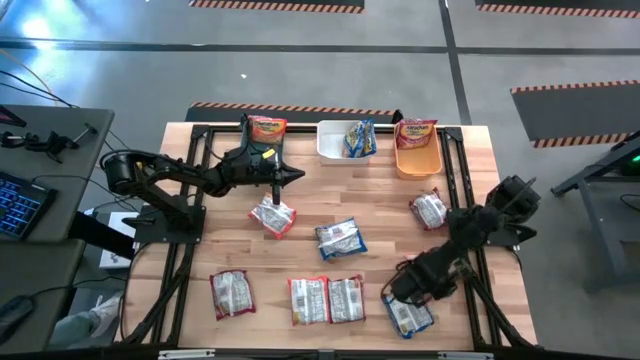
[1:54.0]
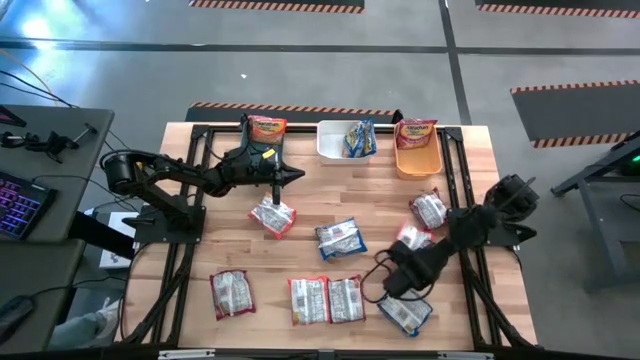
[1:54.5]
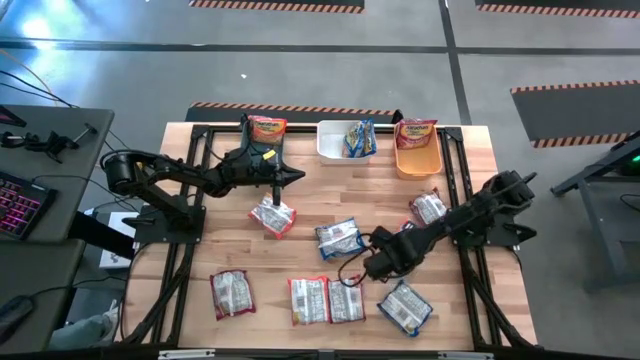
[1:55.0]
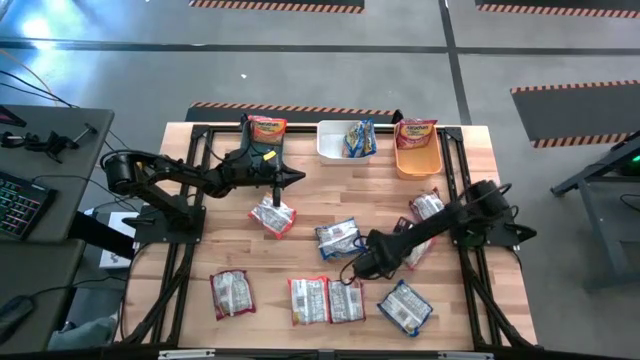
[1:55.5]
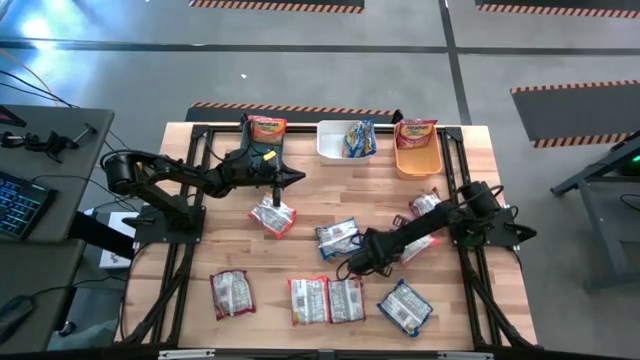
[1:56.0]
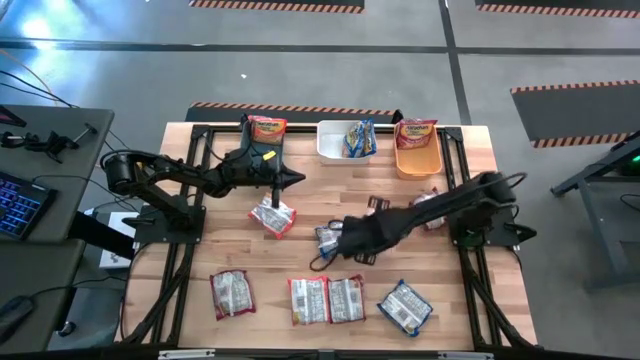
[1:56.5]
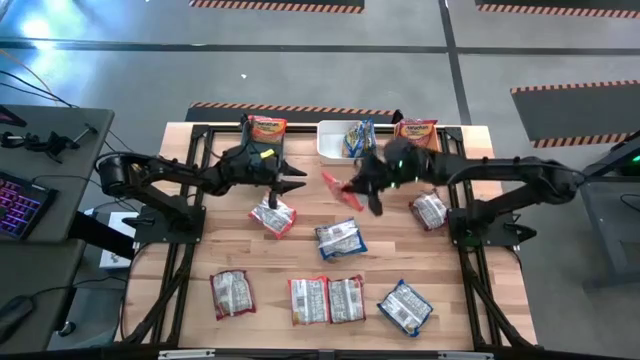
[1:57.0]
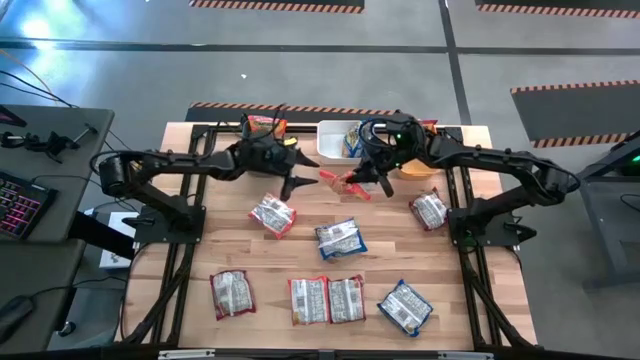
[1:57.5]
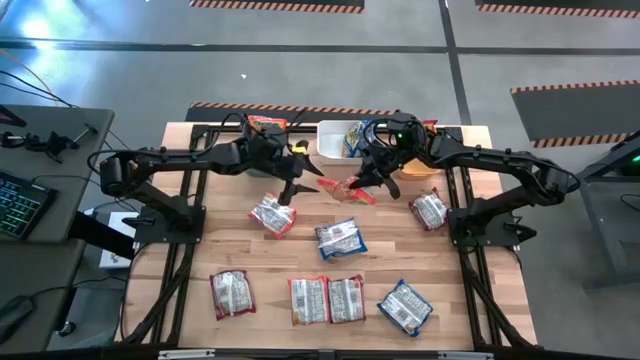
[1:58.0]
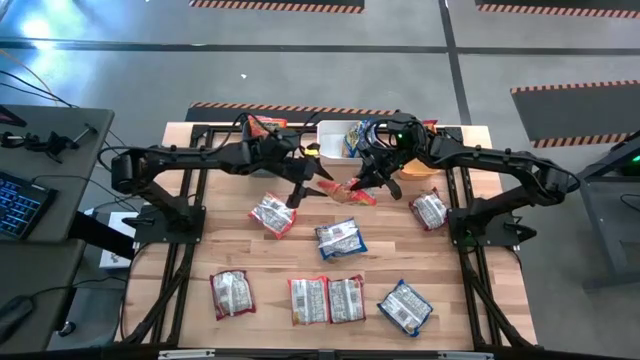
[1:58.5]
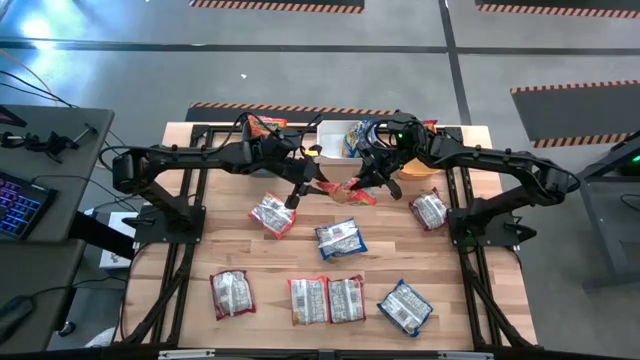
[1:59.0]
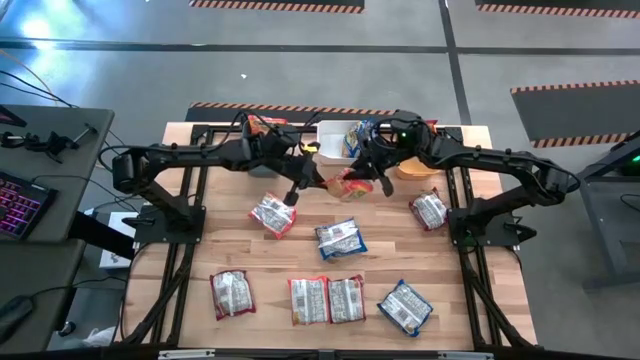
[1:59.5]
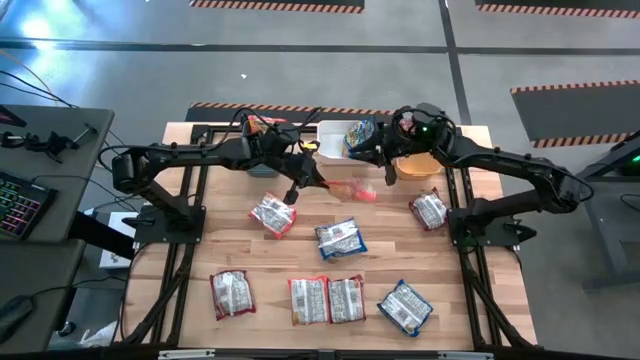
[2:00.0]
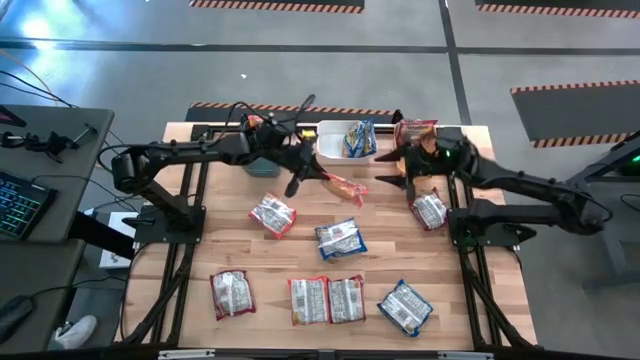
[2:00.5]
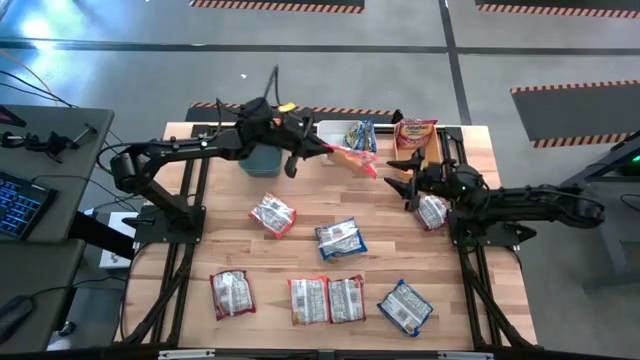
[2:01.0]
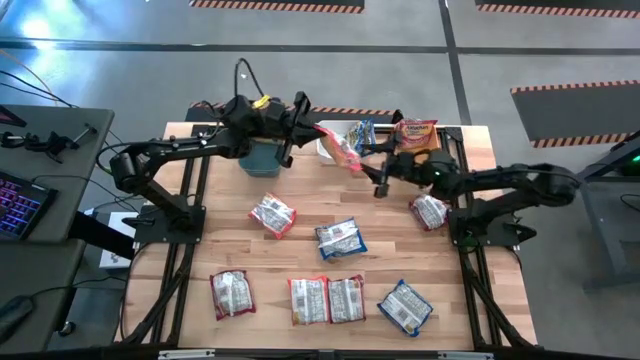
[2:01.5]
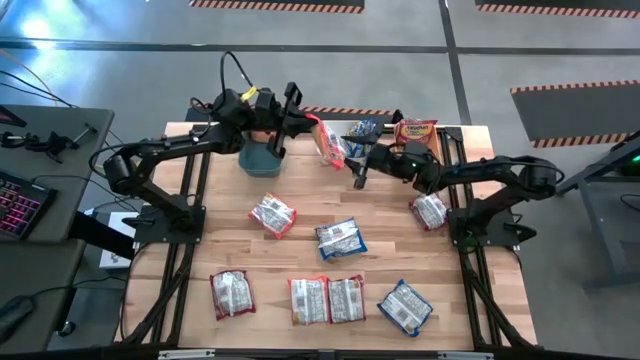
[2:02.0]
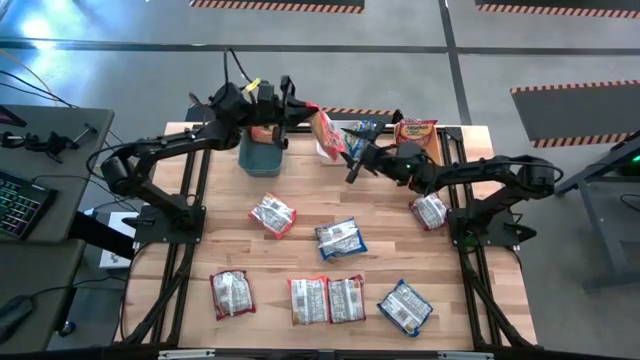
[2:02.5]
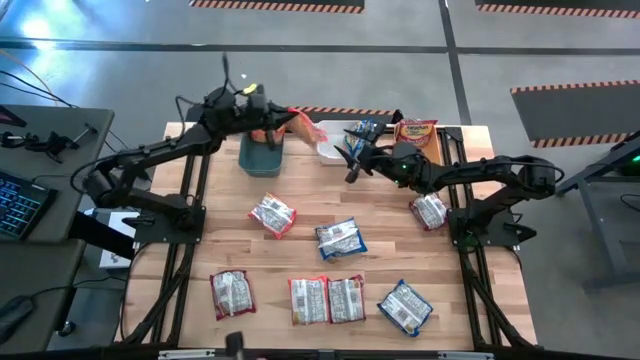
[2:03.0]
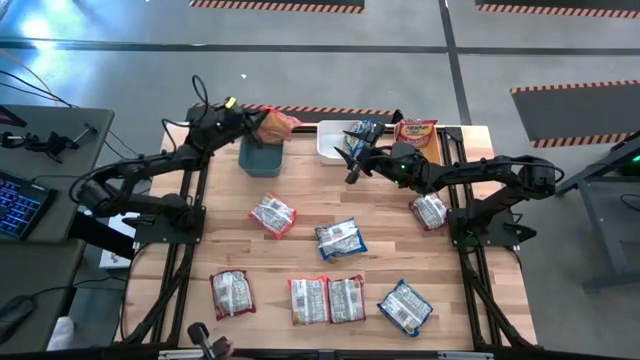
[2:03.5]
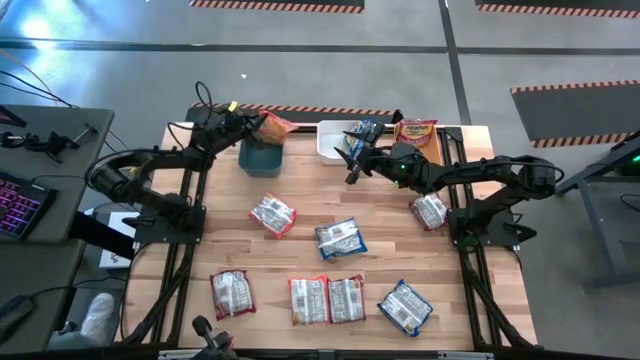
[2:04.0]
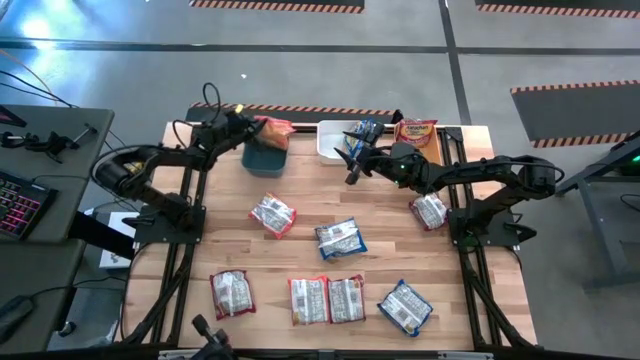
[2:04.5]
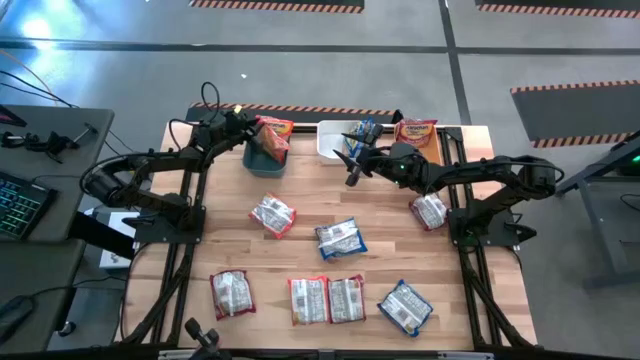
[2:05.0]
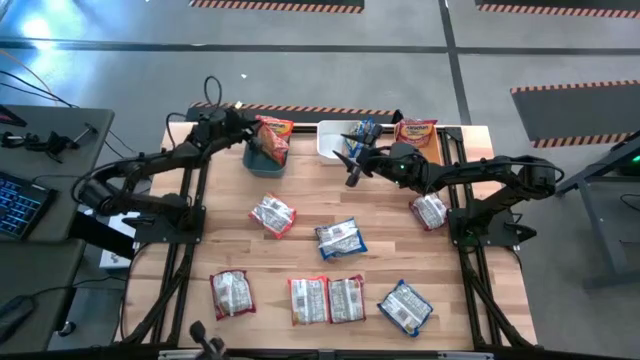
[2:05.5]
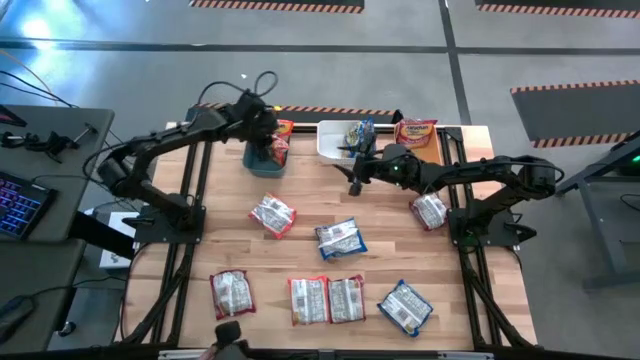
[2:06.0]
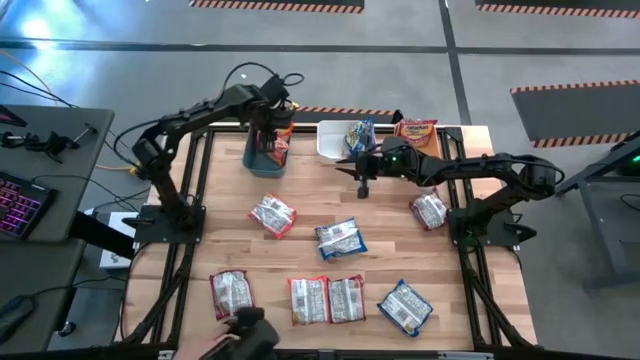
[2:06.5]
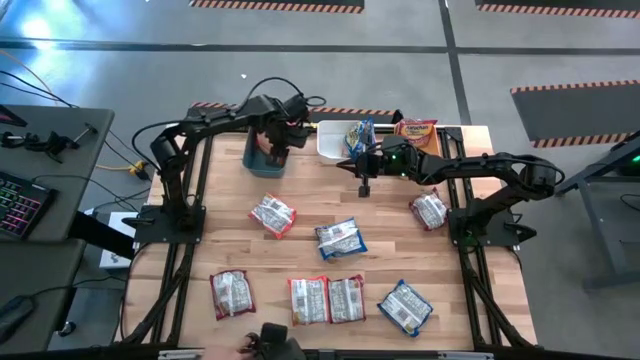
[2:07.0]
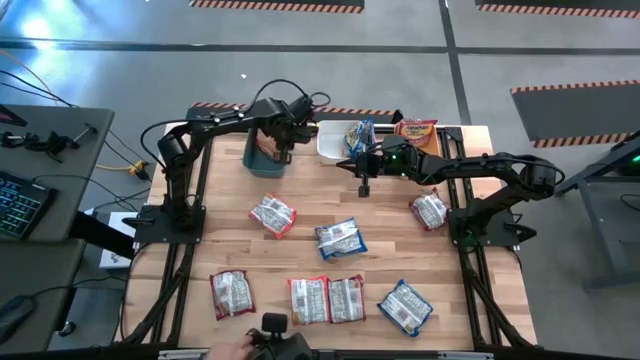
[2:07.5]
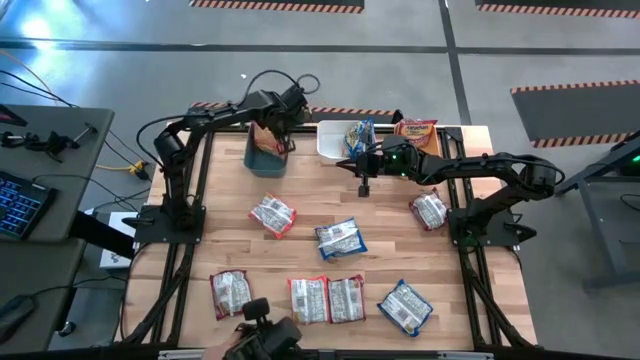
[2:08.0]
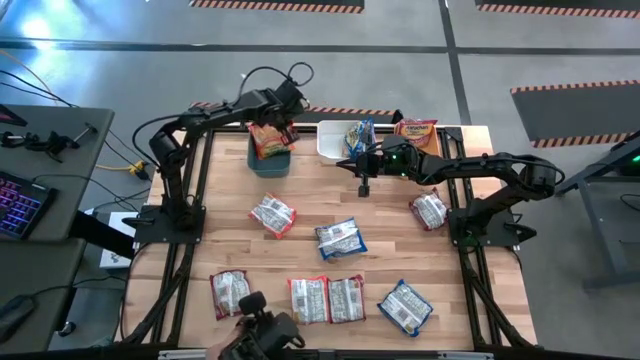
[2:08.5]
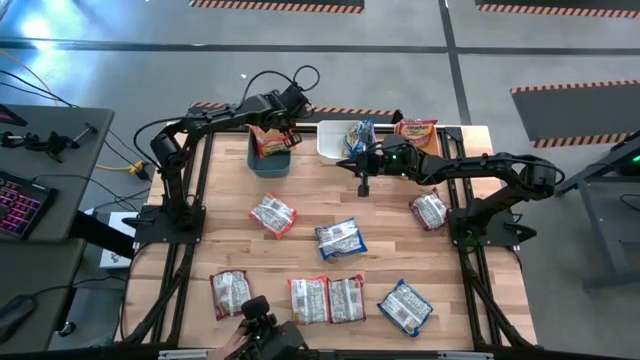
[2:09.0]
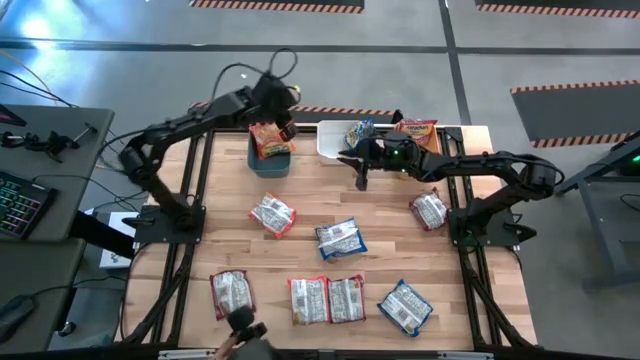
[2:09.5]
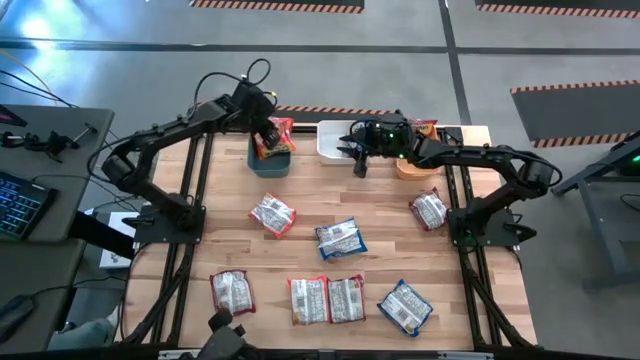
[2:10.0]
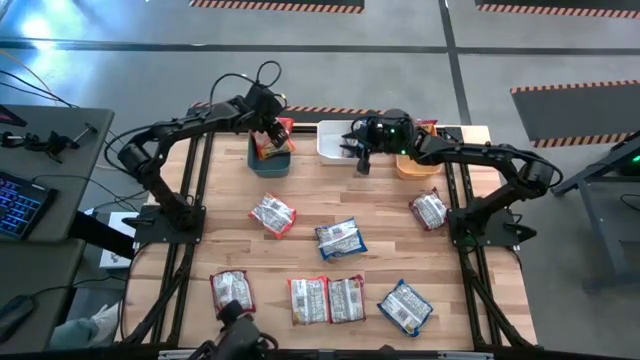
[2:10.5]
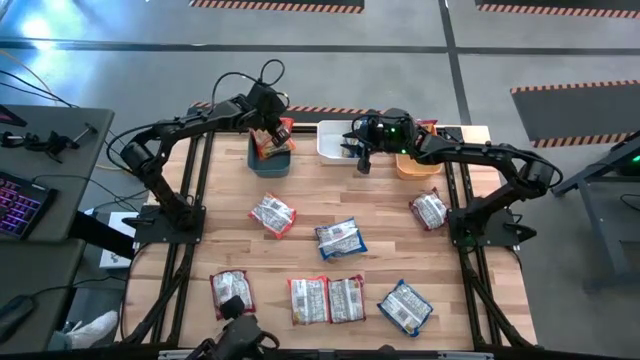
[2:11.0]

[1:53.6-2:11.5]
Task: Sort Maruchan noodles
Put the right orange noodle pack into the blue bin

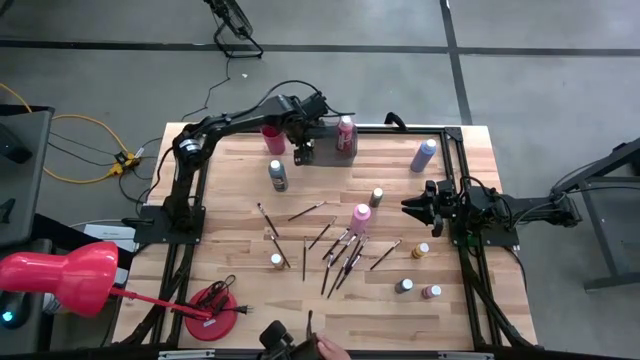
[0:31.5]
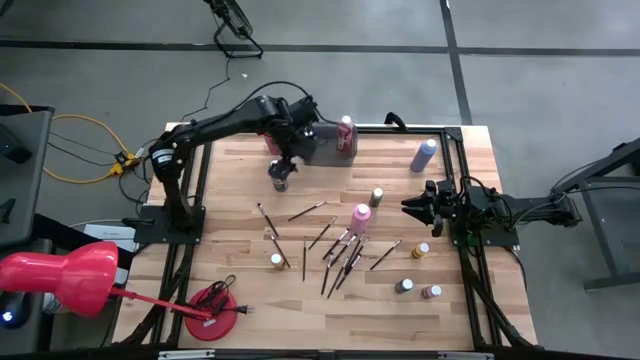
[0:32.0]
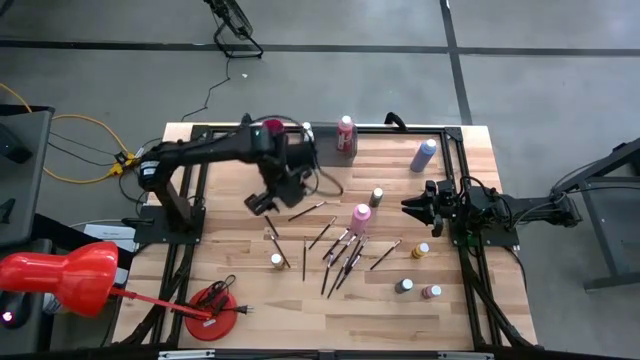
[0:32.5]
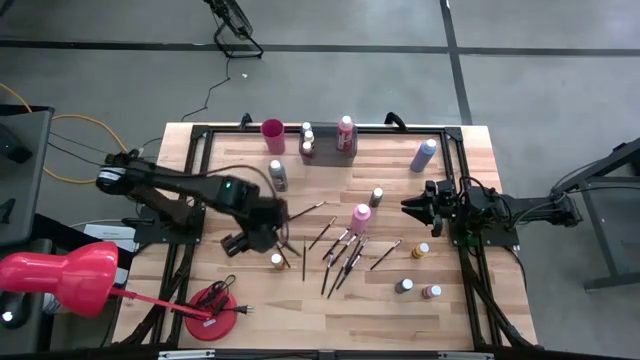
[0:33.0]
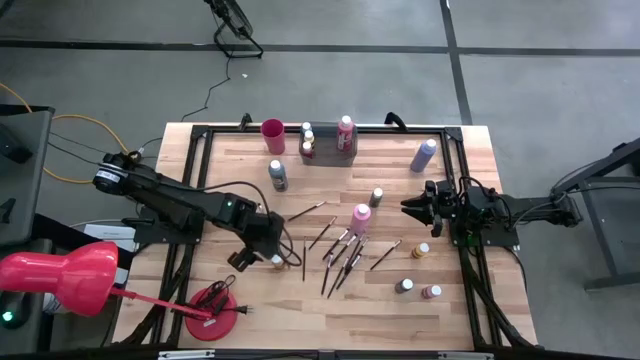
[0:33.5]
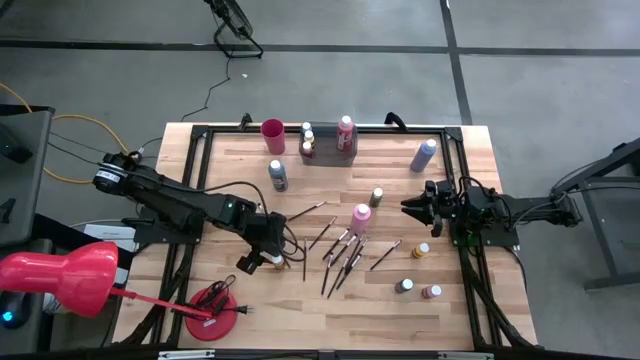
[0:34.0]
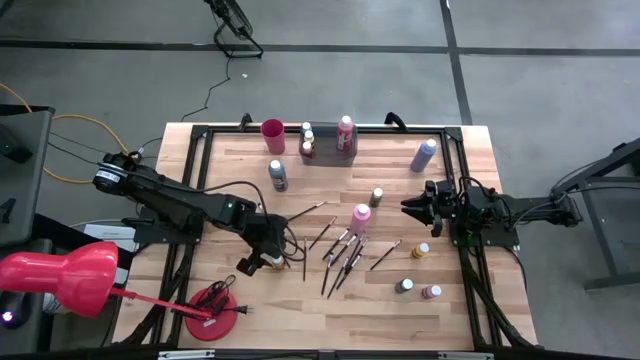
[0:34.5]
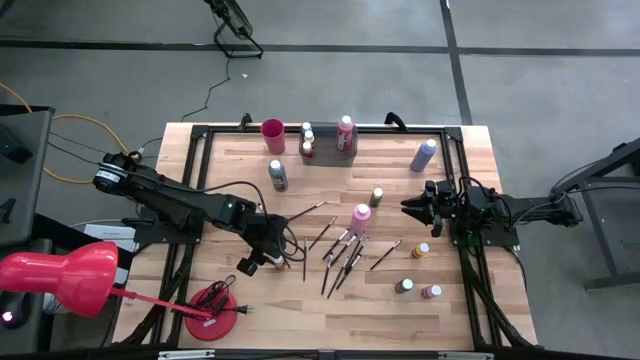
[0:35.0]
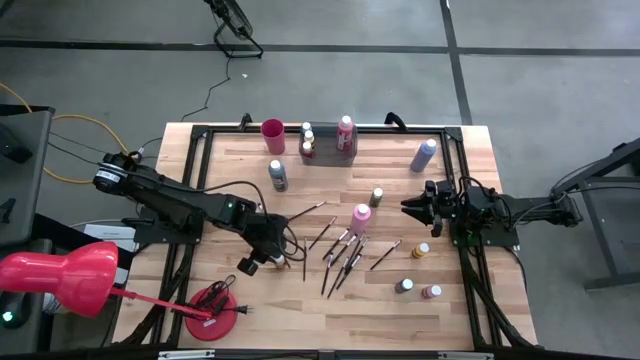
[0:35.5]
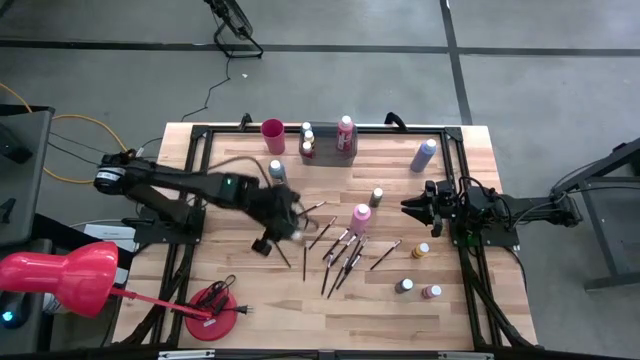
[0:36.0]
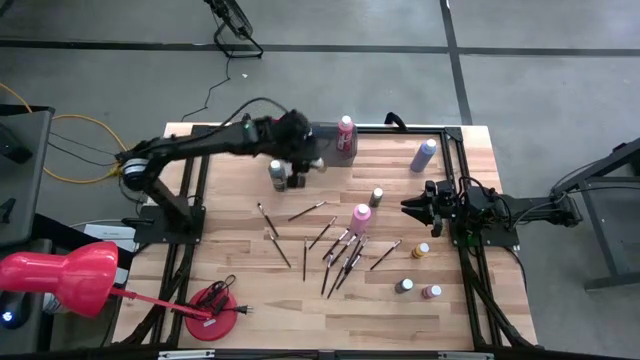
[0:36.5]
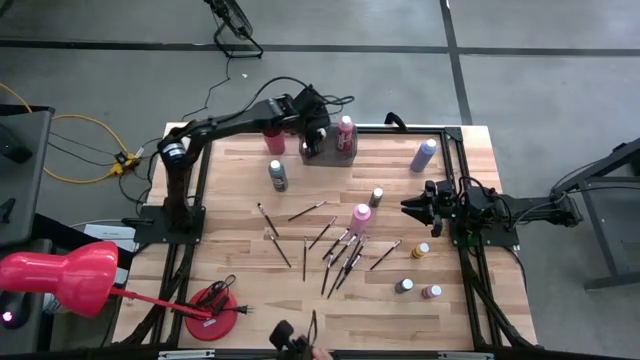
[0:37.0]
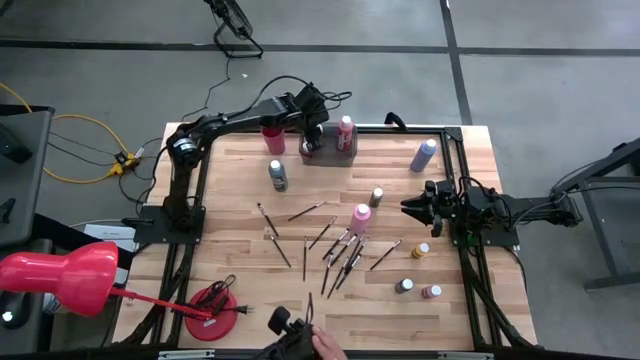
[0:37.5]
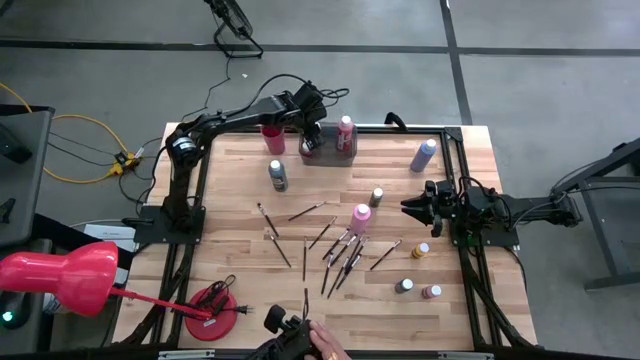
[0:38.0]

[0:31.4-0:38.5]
Task: Pick & Place Paint Supplies
Put the small yellow paint bottle into the black bin
